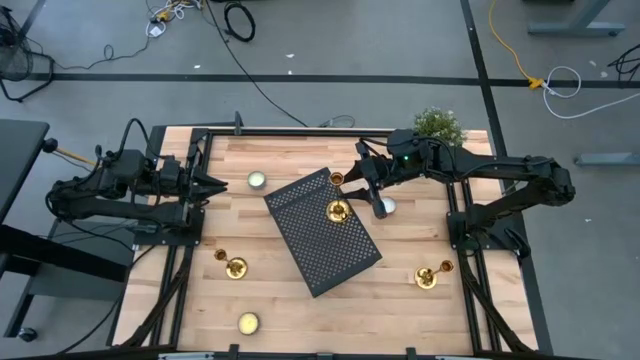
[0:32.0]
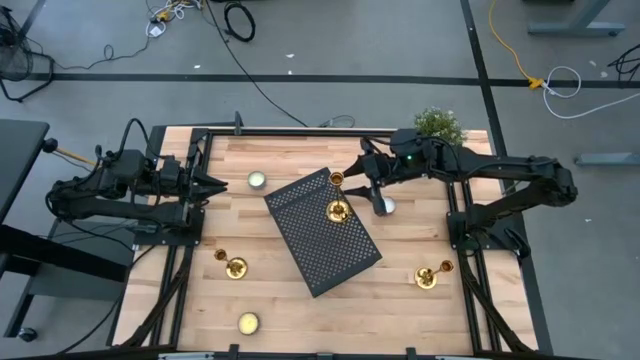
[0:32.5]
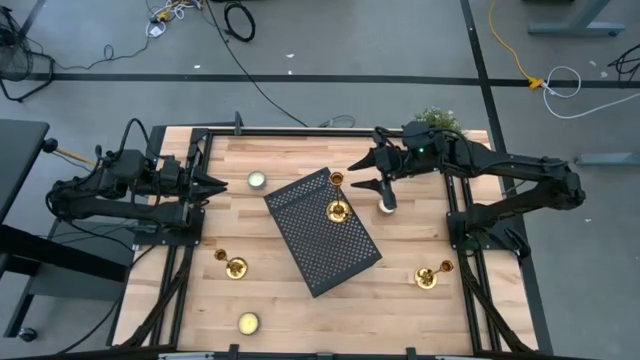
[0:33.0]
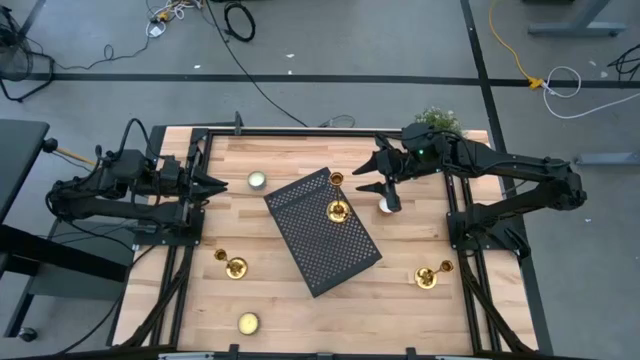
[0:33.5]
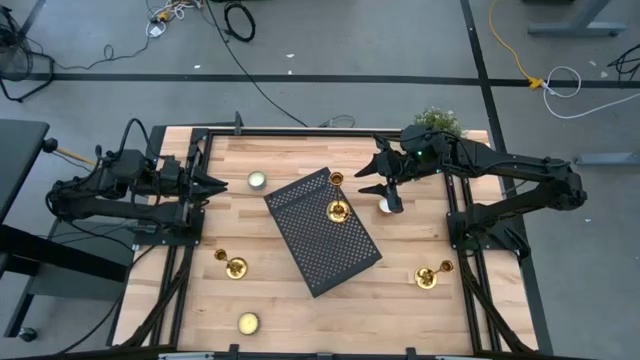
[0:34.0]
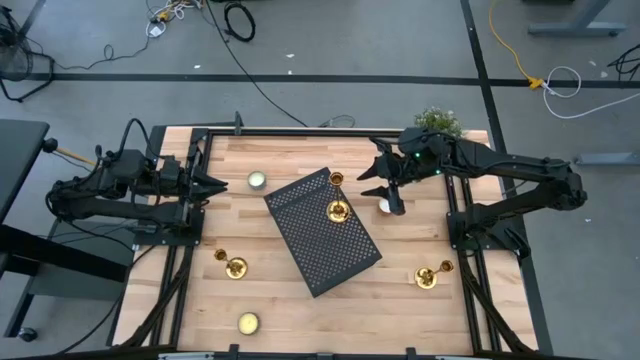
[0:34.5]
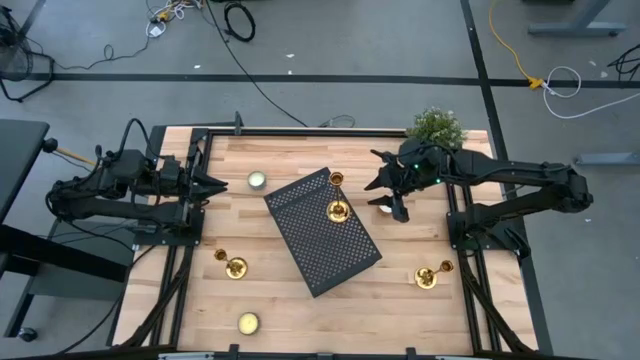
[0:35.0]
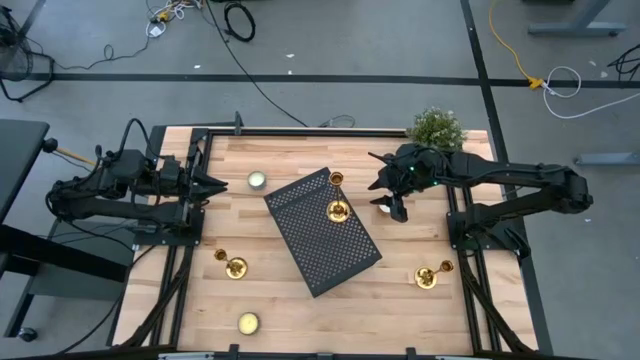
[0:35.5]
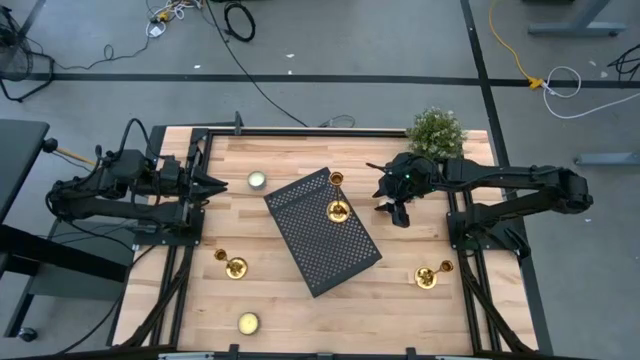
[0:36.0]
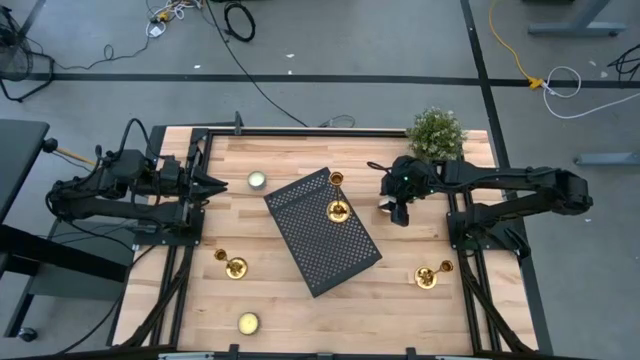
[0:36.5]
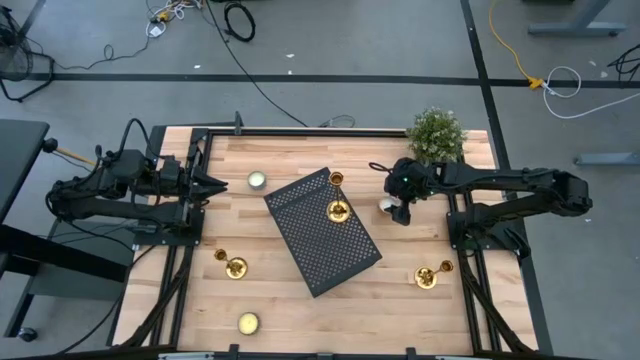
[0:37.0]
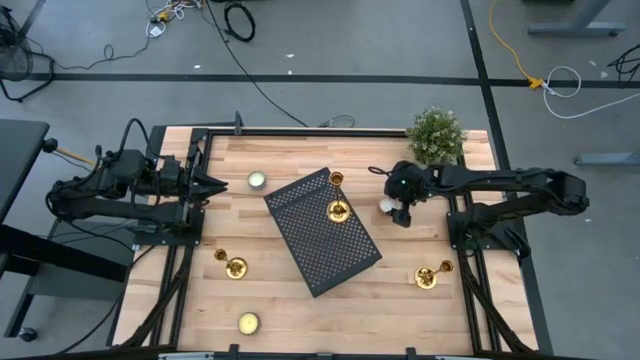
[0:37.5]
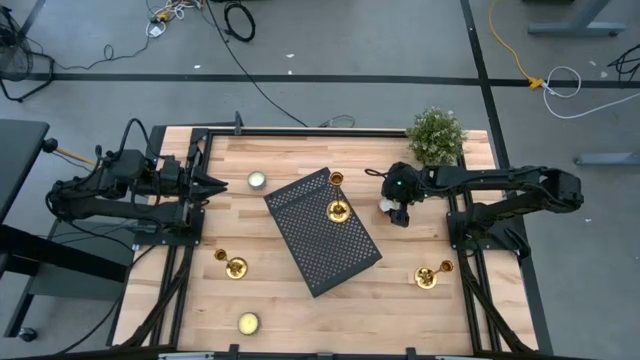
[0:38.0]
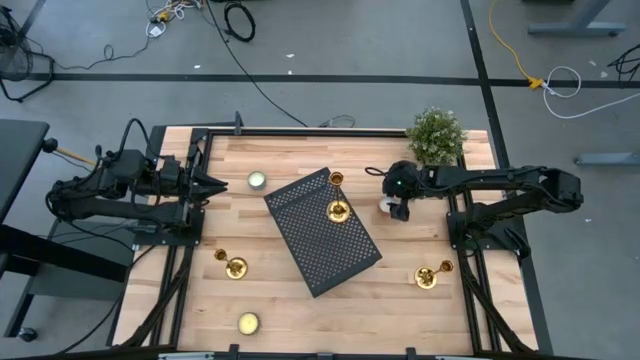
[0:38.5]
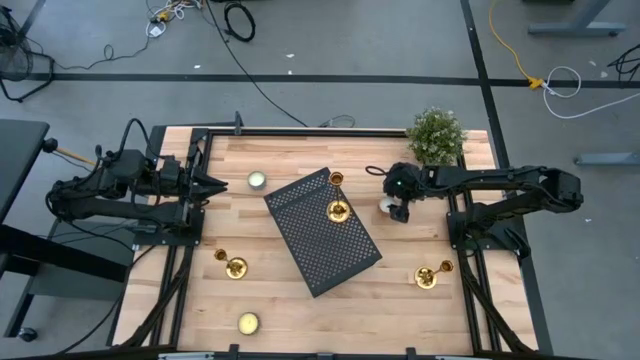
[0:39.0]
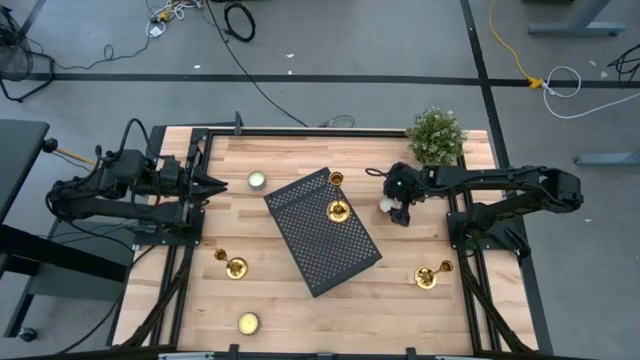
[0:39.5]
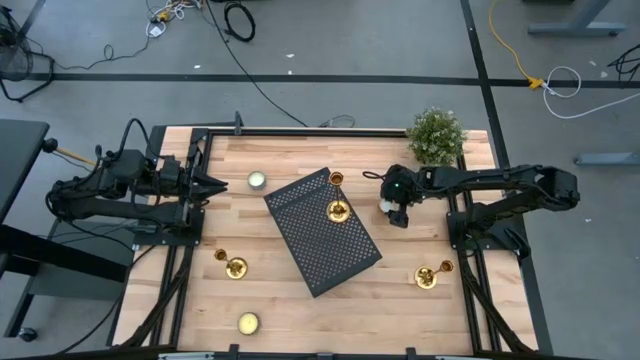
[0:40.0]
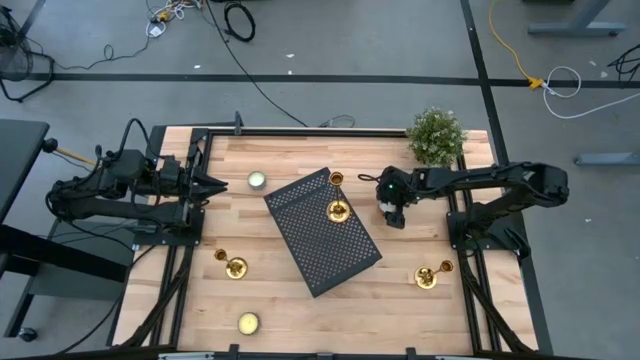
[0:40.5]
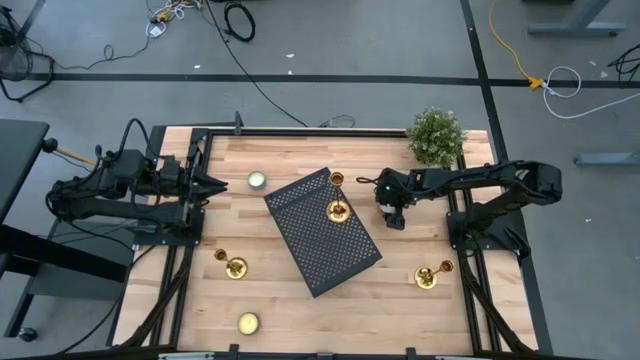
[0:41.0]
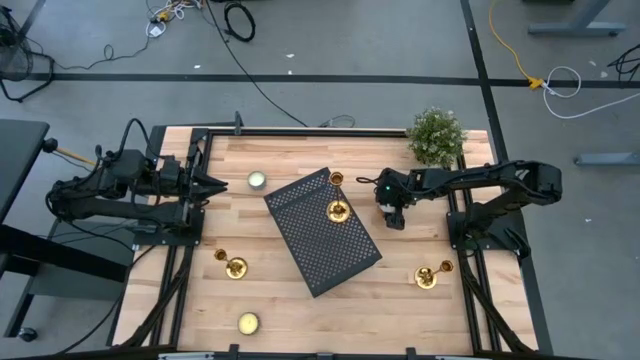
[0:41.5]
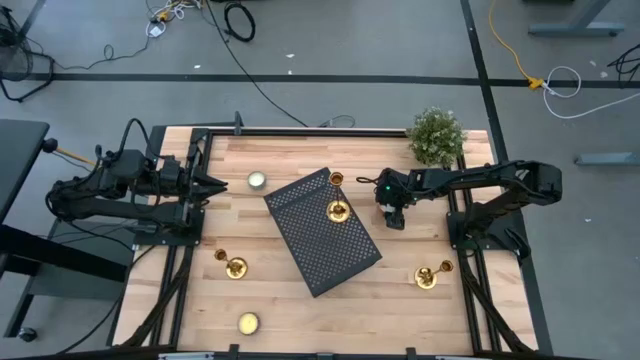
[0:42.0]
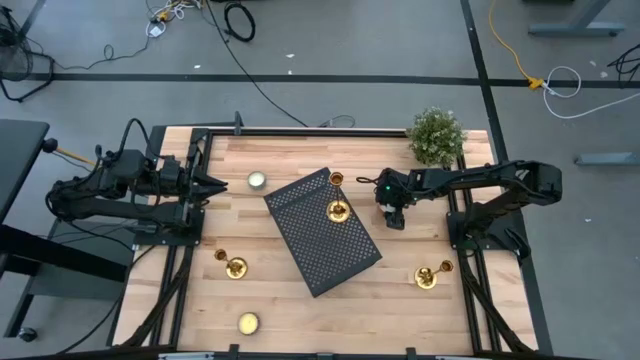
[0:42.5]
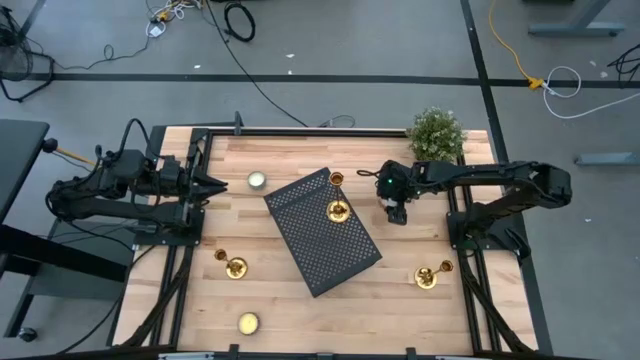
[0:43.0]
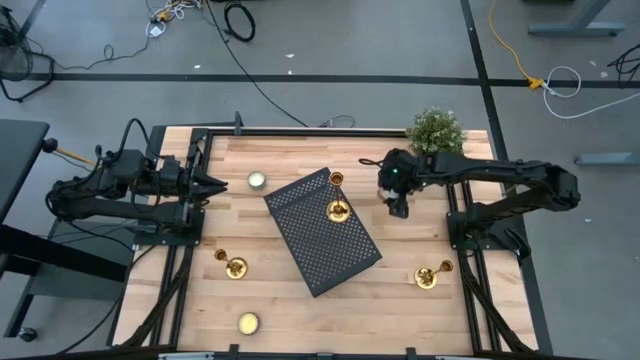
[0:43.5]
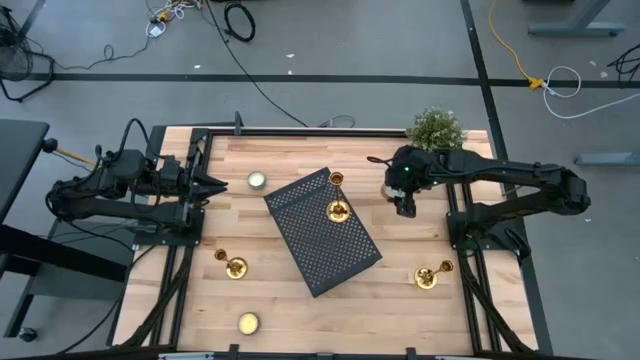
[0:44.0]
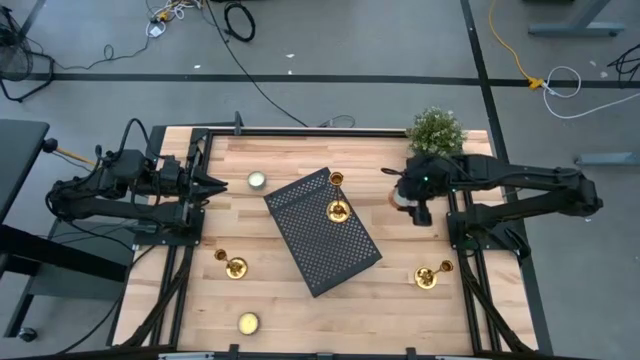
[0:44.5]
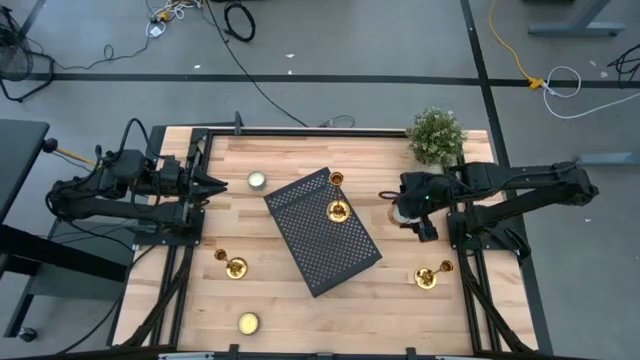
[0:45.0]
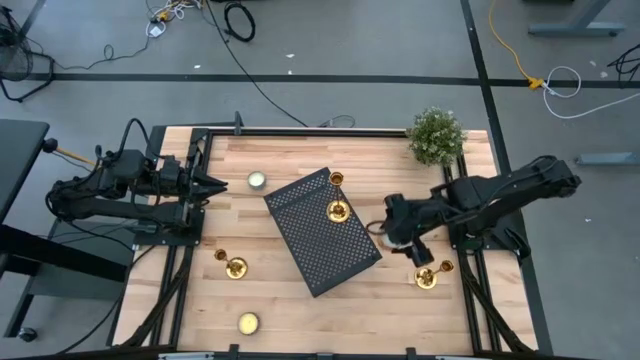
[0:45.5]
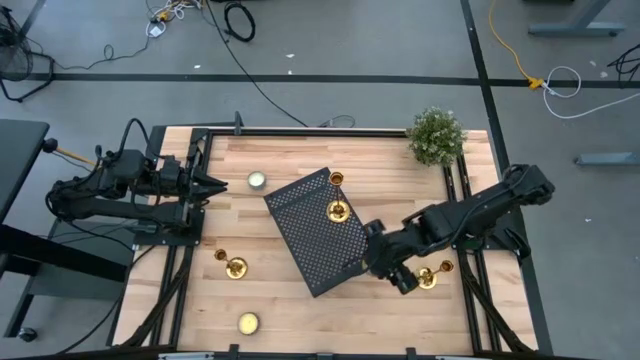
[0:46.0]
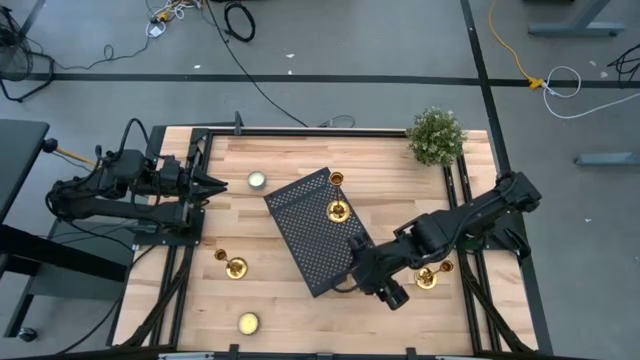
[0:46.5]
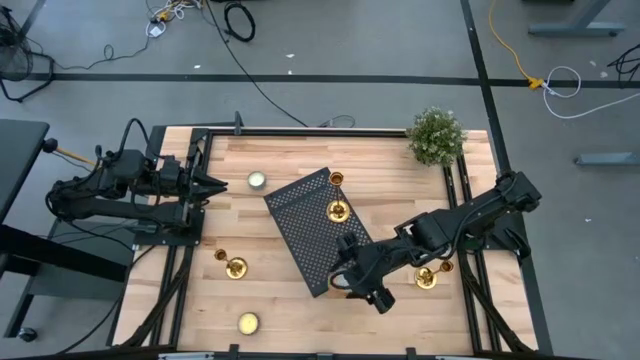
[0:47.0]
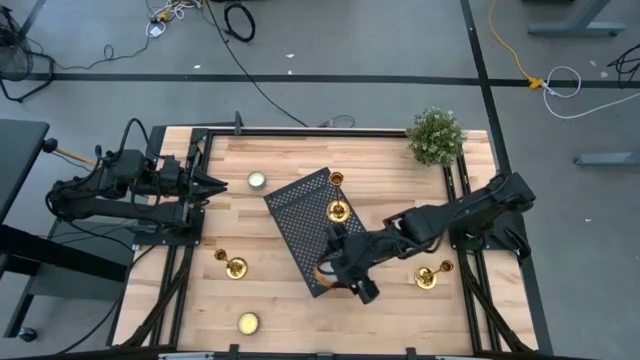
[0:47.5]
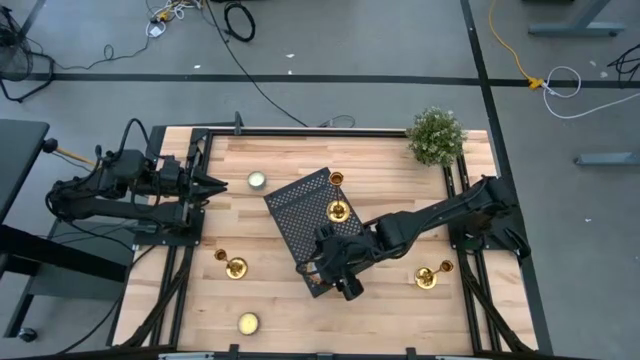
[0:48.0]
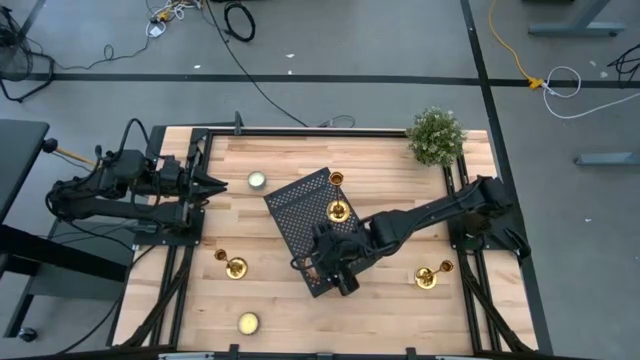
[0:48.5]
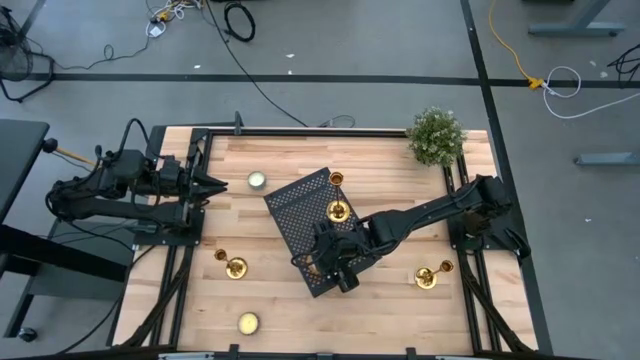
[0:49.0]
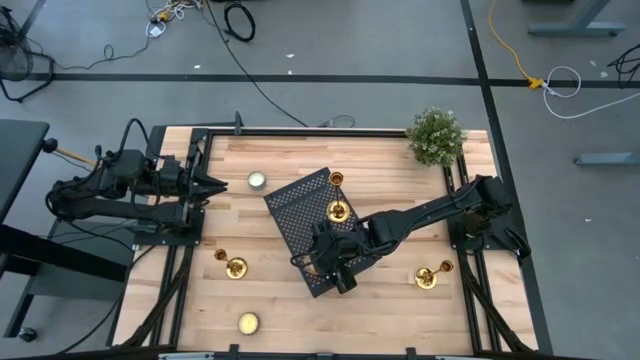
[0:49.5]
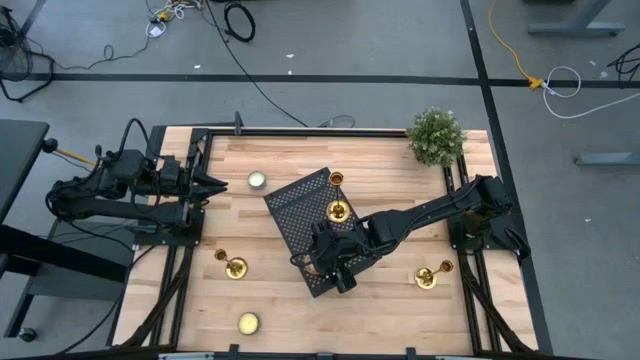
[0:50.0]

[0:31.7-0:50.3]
Task: Pick & Place candle stick holders
Put the orange scented candle on the shelf

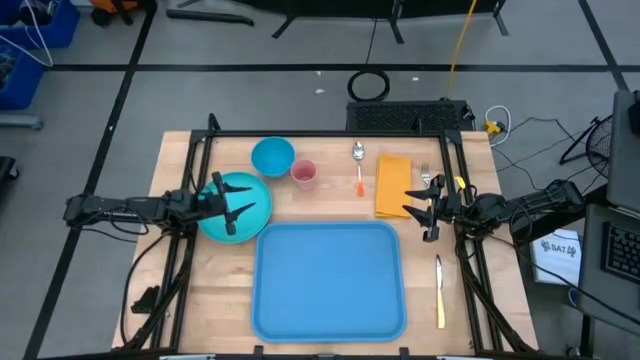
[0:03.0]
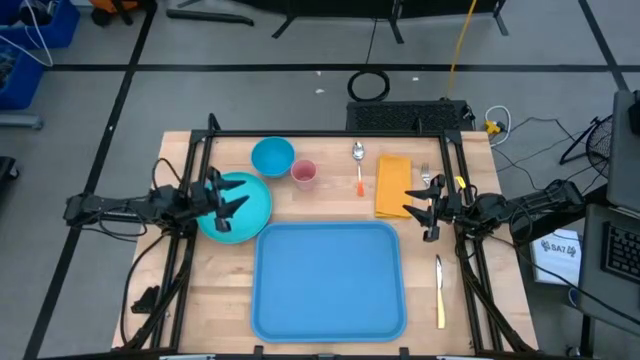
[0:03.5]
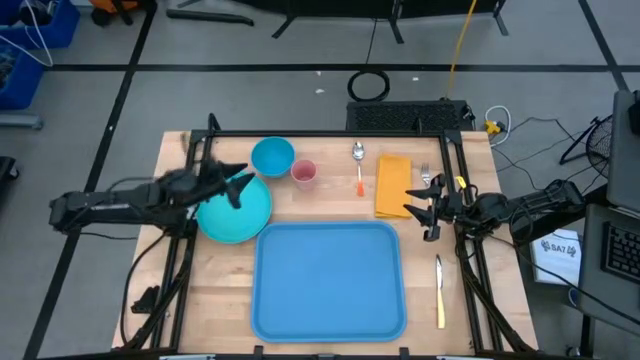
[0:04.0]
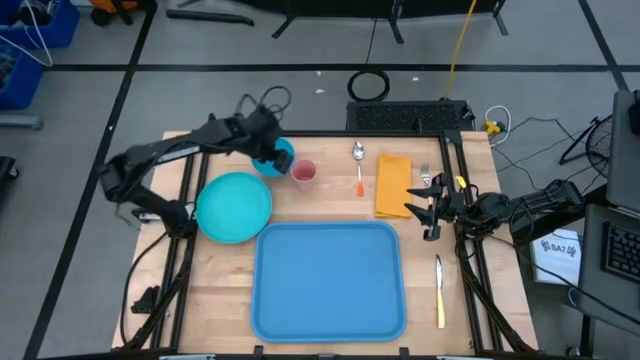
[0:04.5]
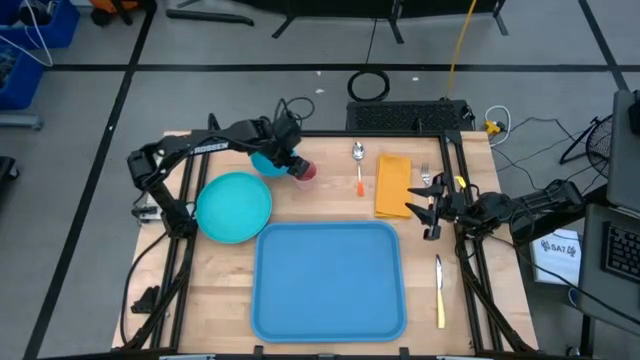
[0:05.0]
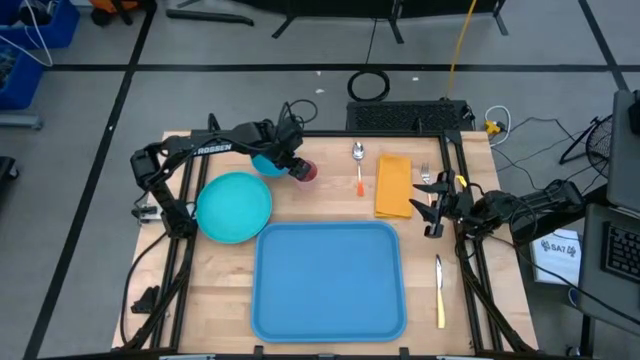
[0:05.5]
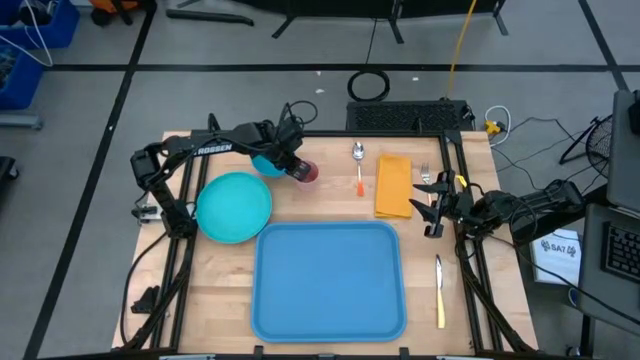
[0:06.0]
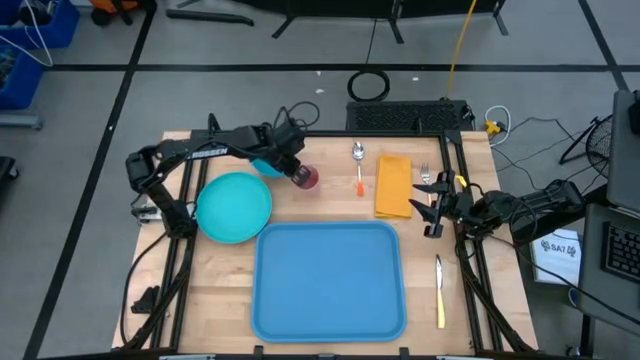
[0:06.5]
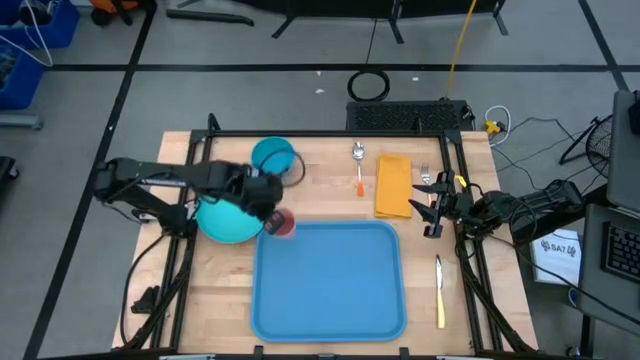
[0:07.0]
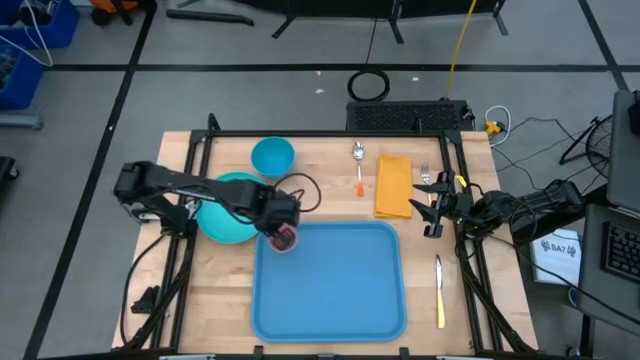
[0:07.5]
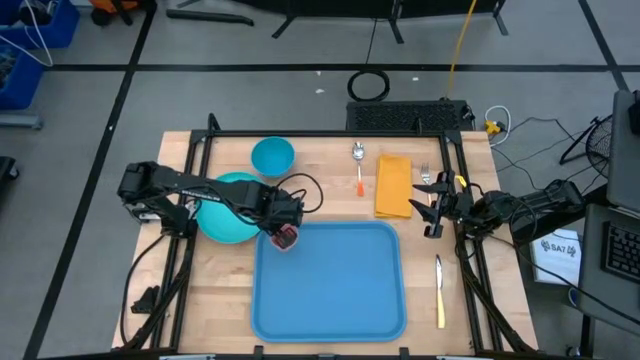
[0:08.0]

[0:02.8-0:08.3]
Task: Set up tray
Put the pink cup on the blue tray
